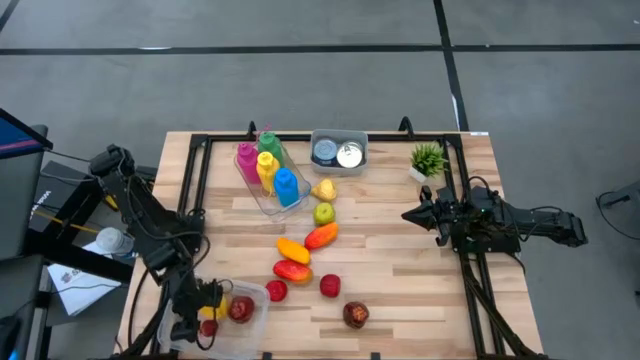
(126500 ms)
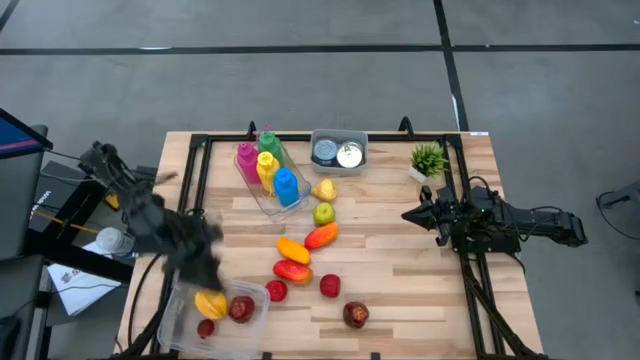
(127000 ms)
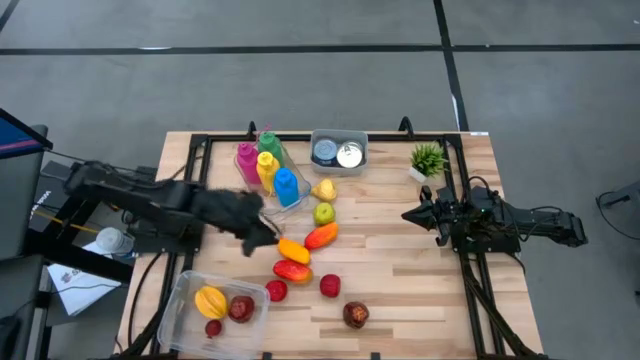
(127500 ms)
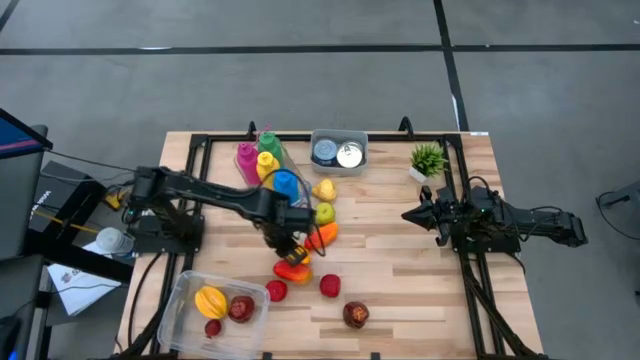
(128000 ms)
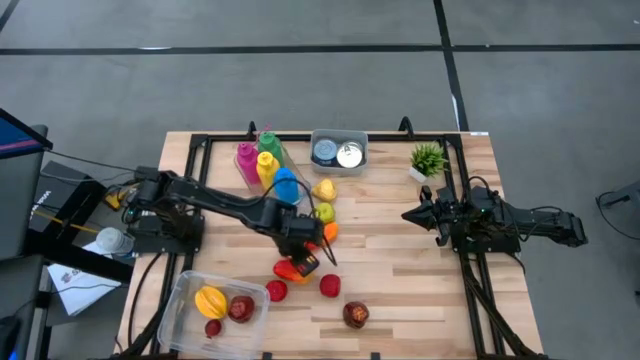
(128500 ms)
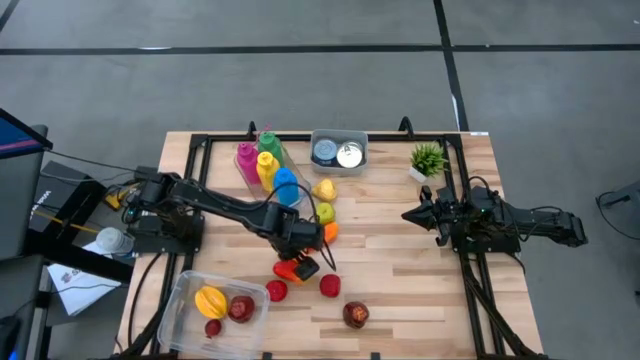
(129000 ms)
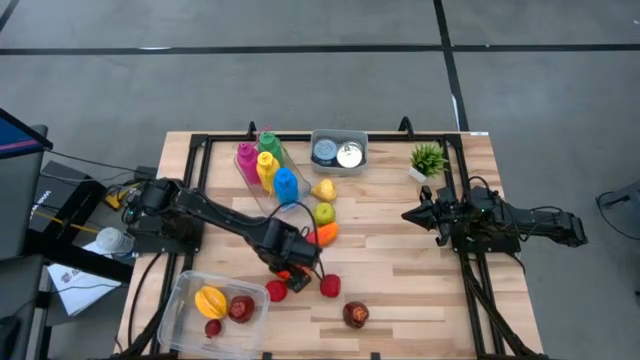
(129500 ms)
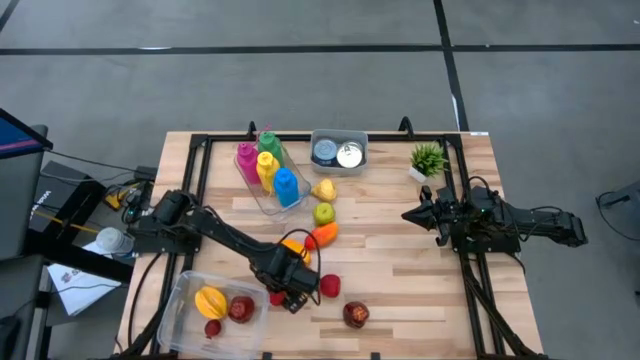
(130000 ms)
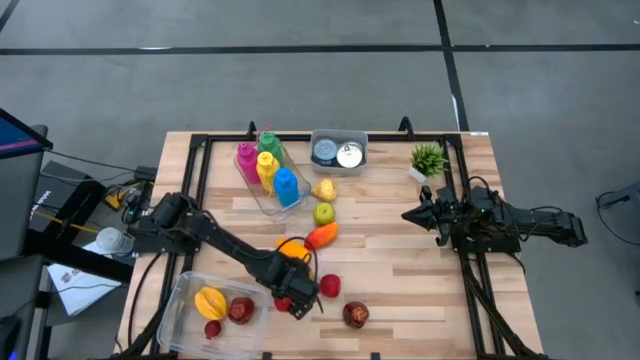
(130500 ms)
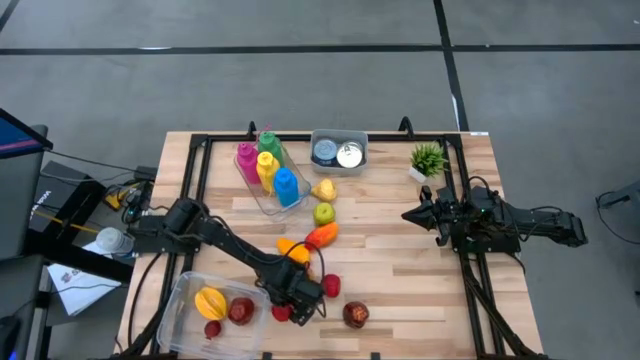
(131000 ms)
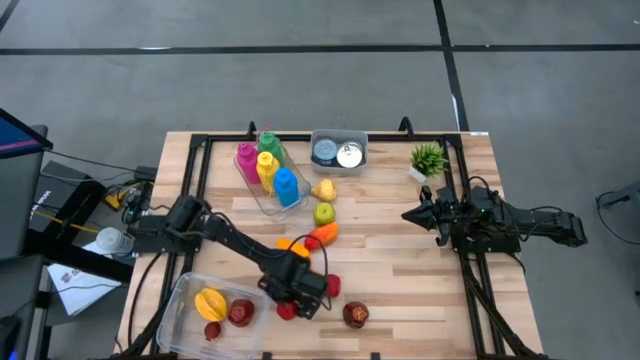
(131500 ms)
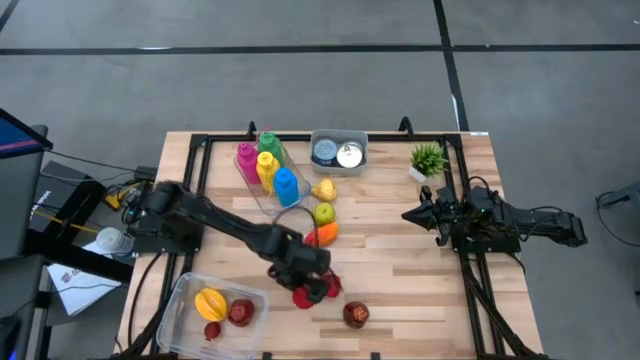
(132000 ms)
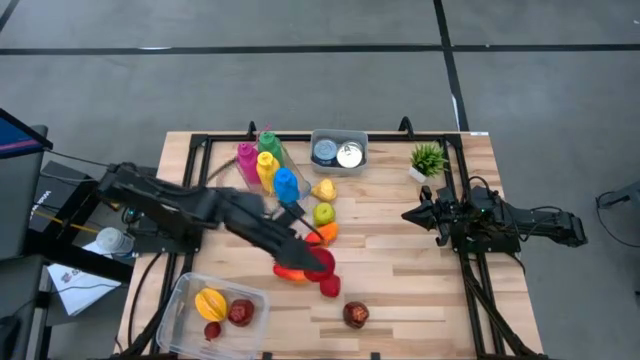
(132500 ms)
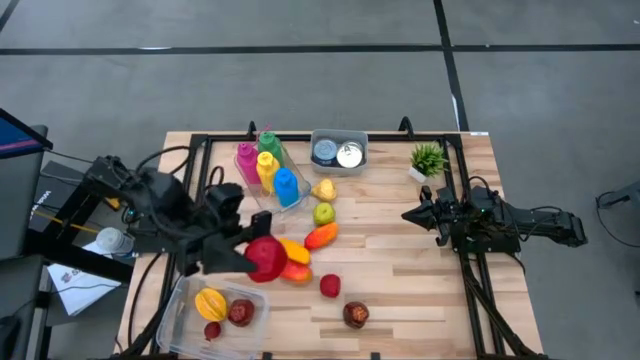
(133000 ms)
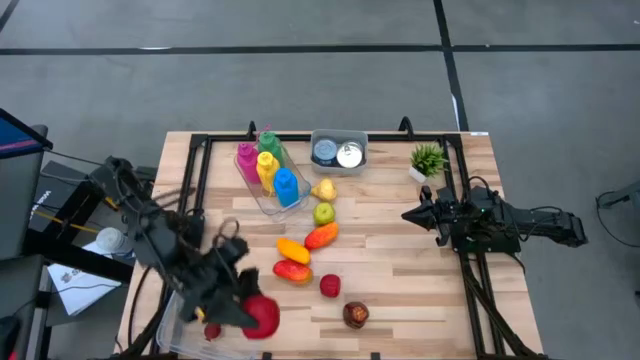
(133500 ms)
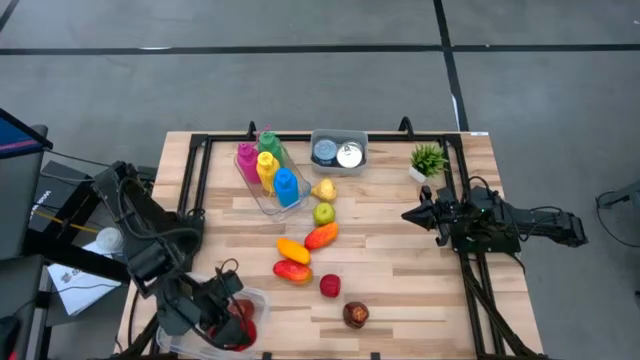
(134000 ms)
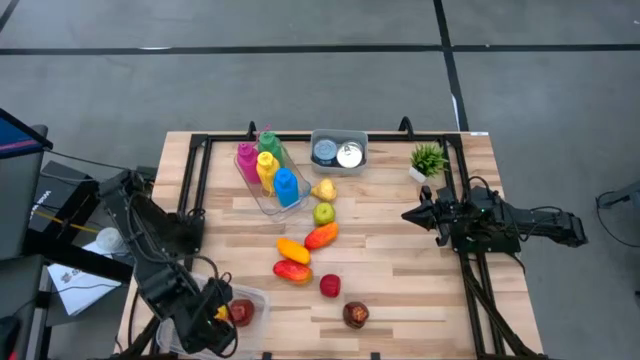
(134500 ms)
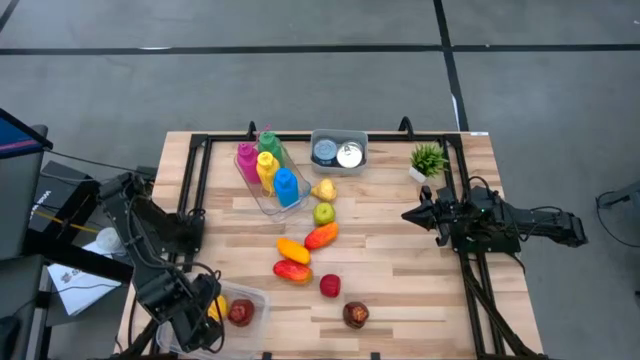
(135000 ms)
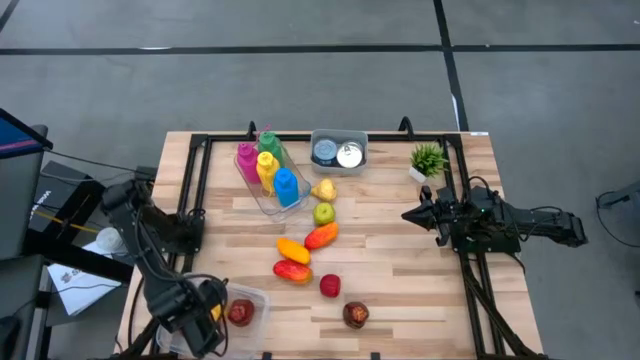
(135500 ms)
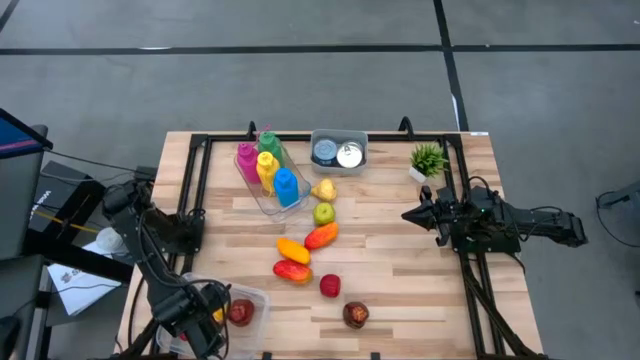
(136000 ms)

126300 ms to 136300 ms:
Task: Pick & Place Food Item
Put the left red tomato into the white bin

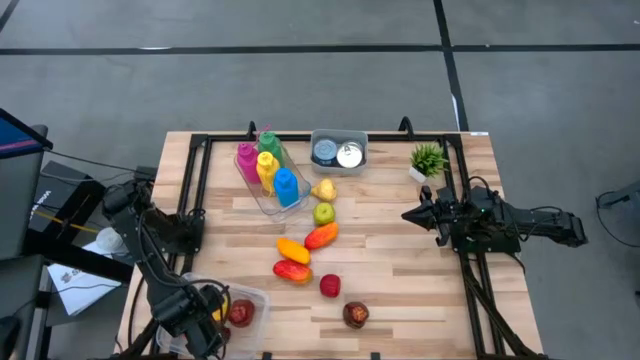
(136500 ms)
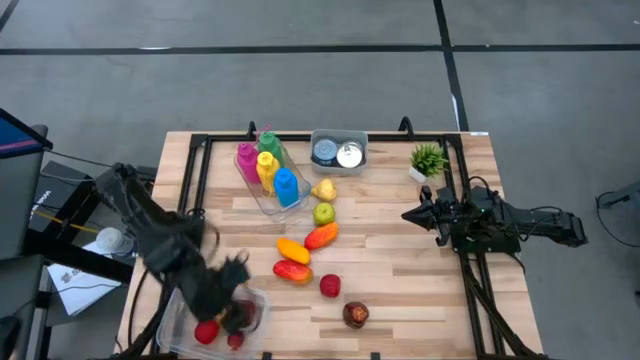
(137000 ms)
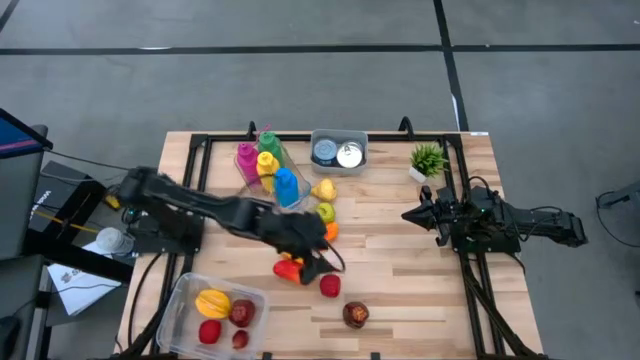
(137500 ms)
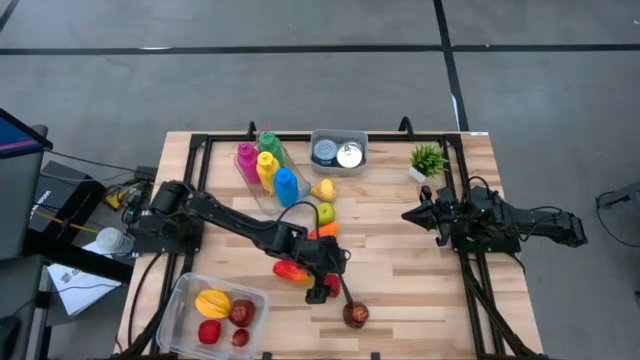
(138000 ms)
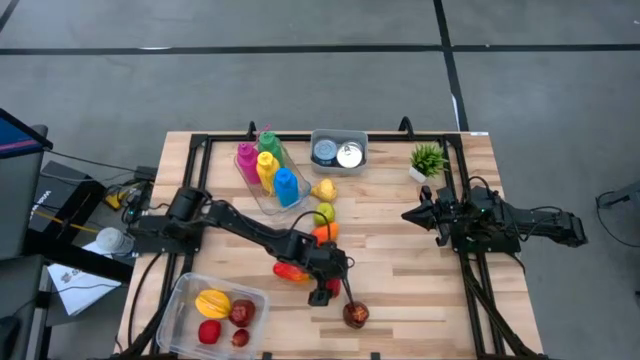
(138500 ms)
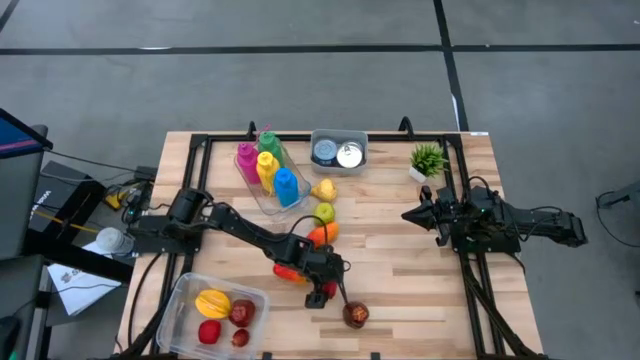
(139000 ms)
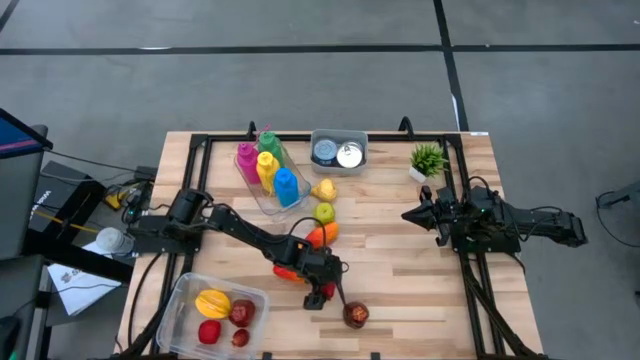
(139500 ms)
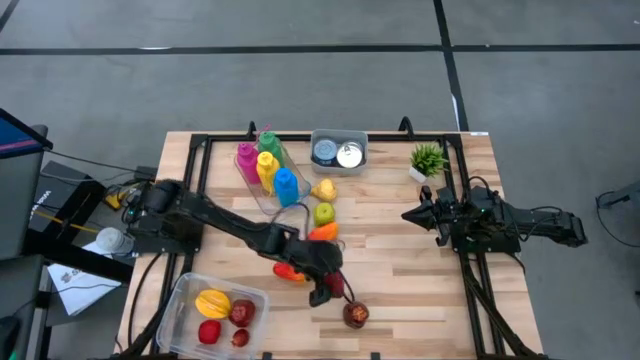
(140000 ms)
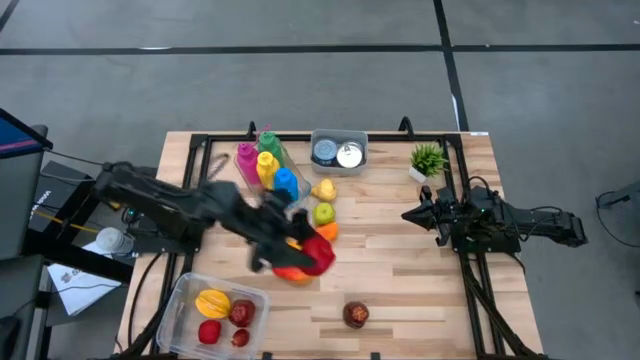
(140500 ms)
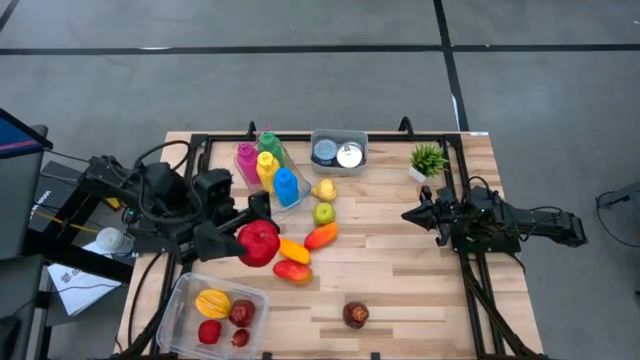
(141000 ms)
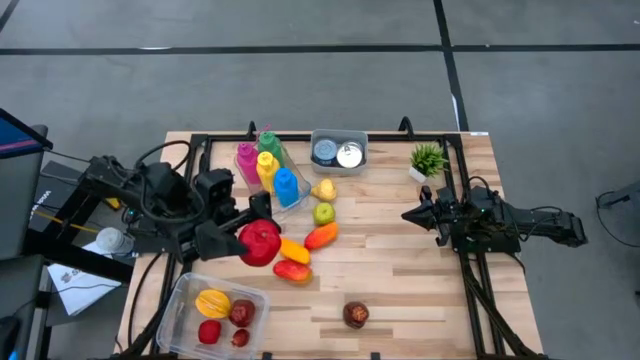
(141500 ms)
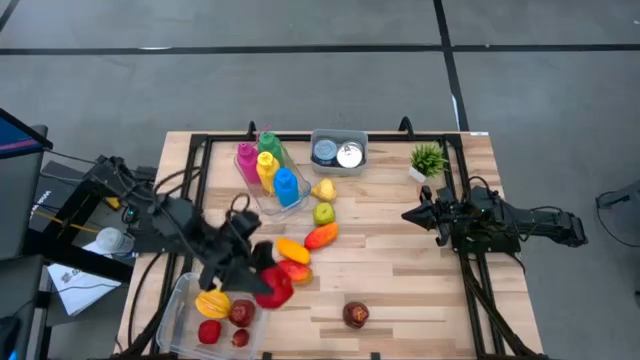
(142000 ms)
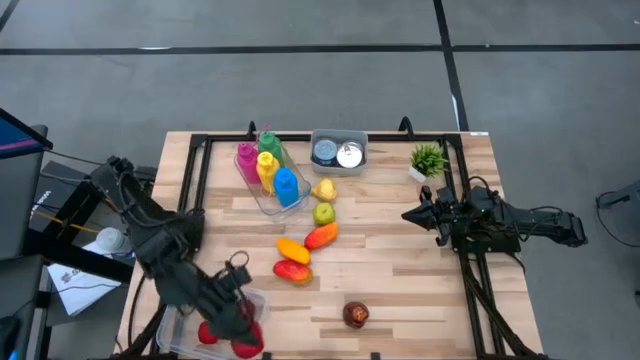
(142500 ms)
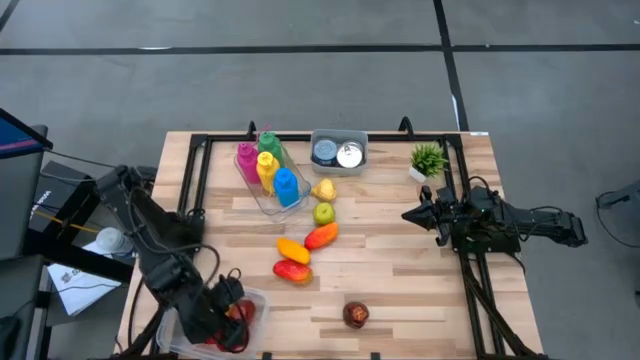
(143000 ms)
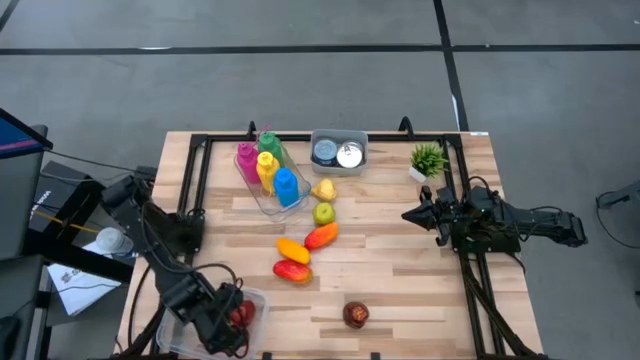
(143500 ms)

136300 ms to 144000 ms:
Put the red tomato into the white bin

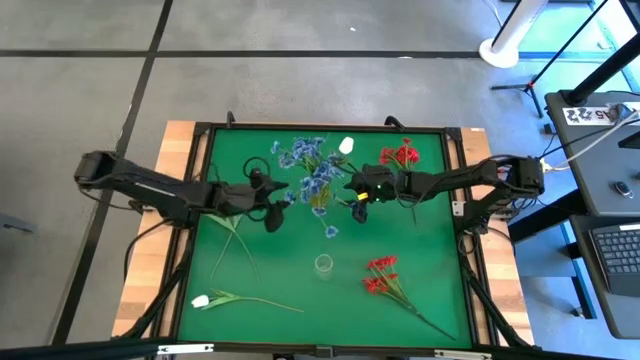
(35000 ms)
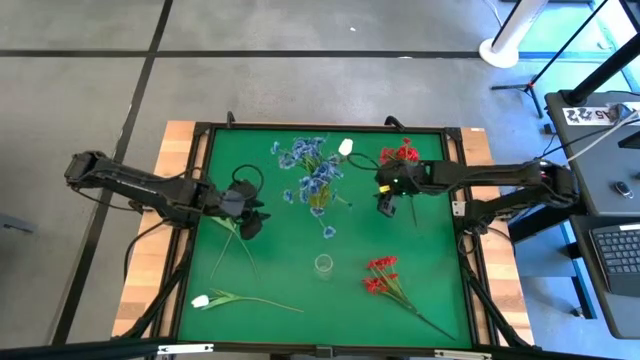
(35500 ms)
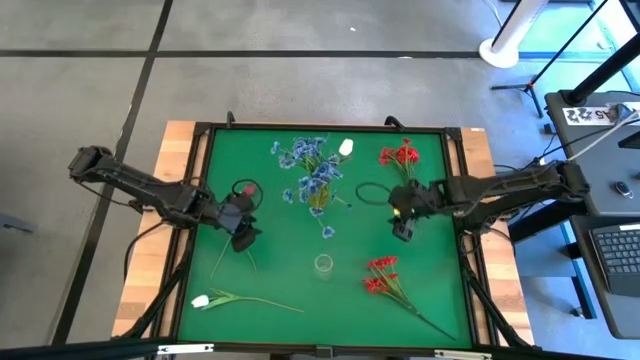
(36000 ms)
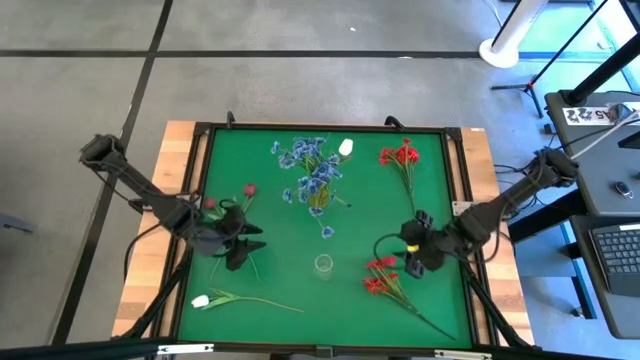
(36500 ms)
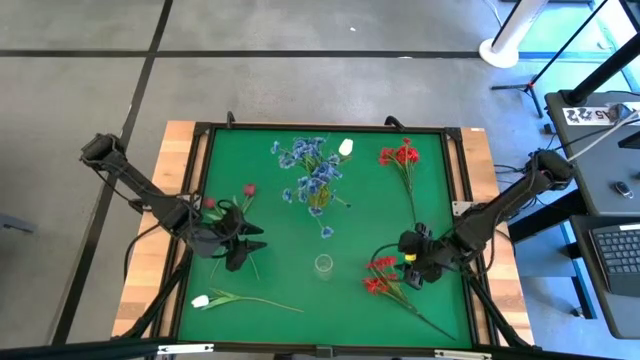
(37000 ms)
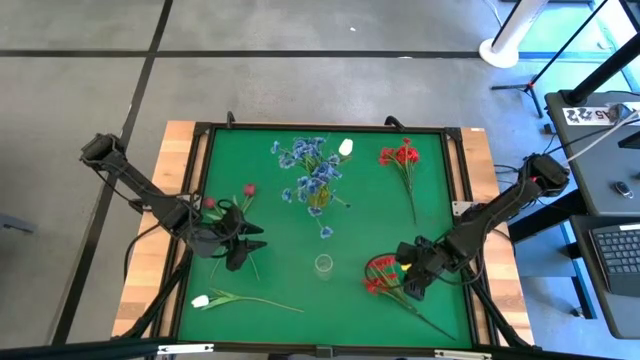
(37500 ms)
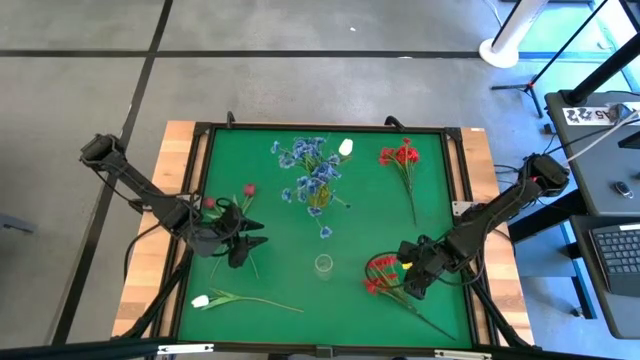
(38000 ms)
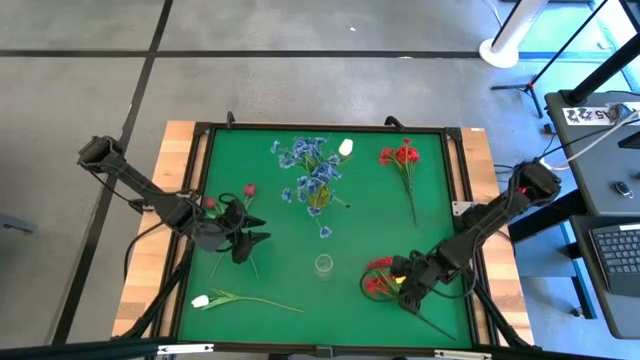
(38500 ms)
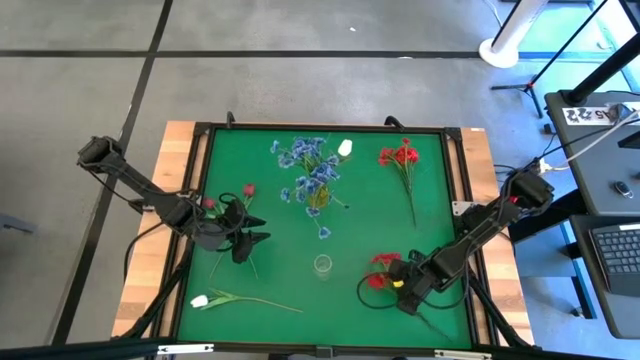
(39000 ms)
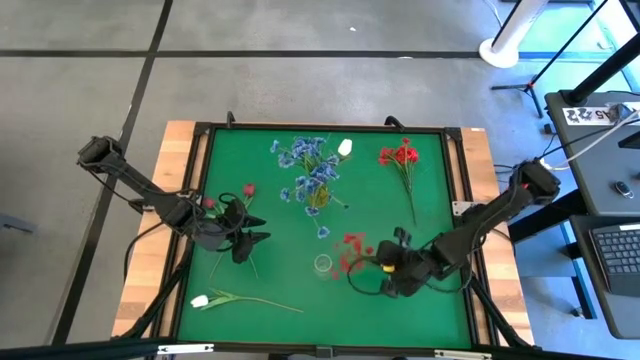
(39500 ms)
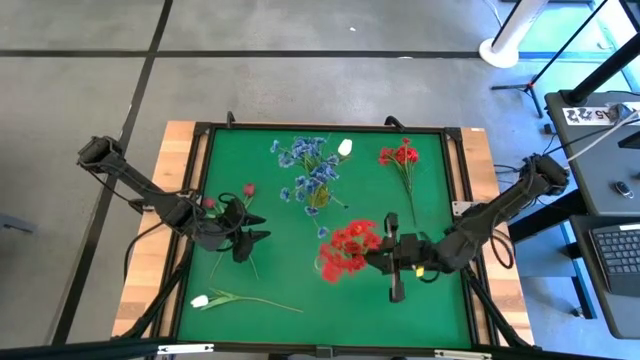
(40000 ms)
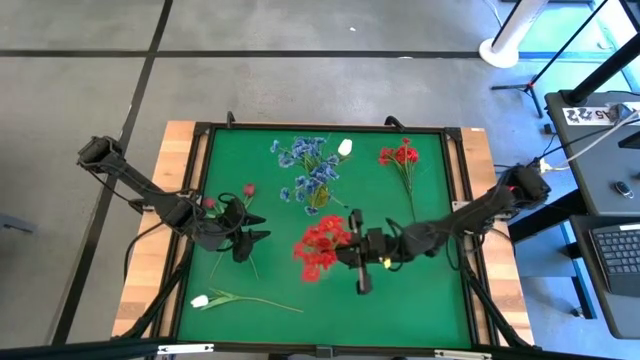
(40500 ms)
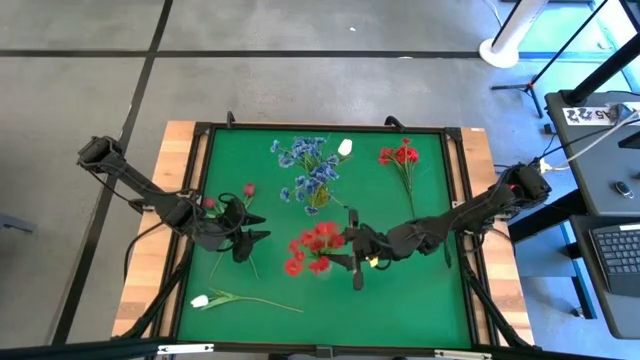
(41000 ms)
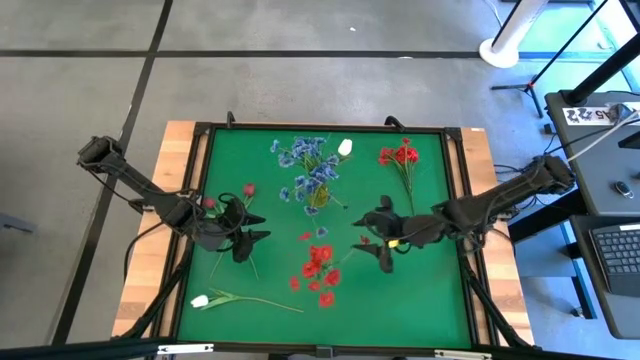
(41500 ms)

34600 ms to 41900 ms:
Task: Sort flowers into vase by color
Put the bottom red flowers into the transparent flower vase
